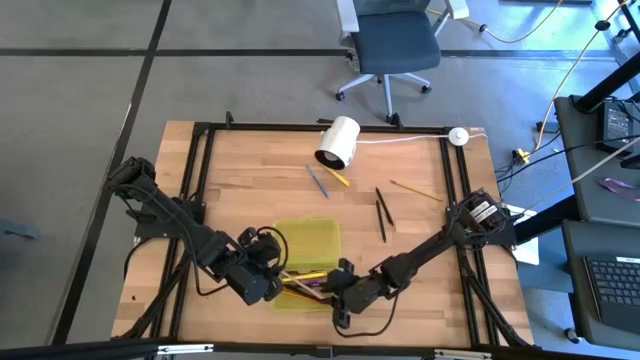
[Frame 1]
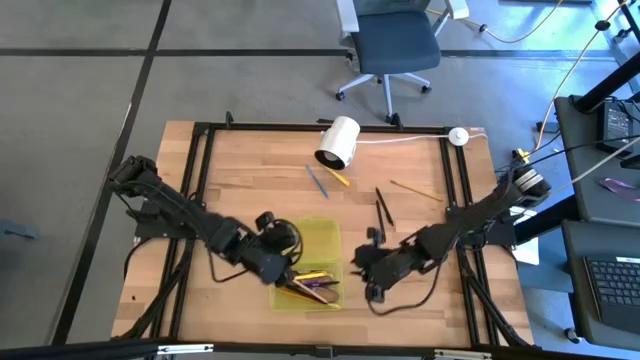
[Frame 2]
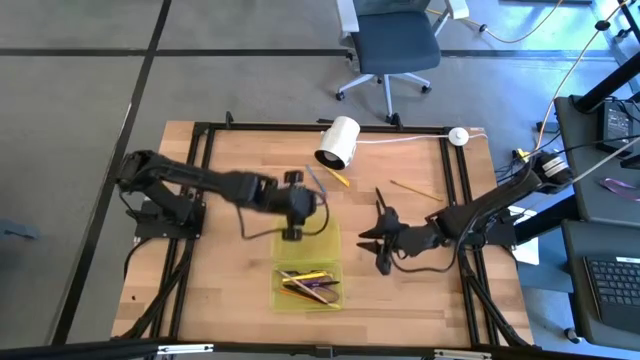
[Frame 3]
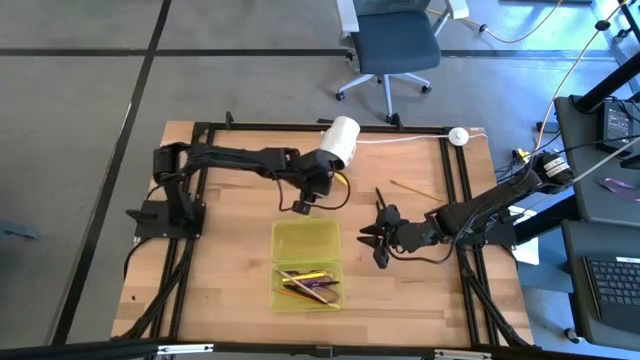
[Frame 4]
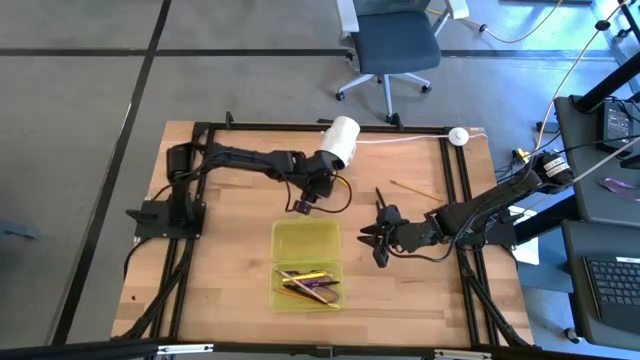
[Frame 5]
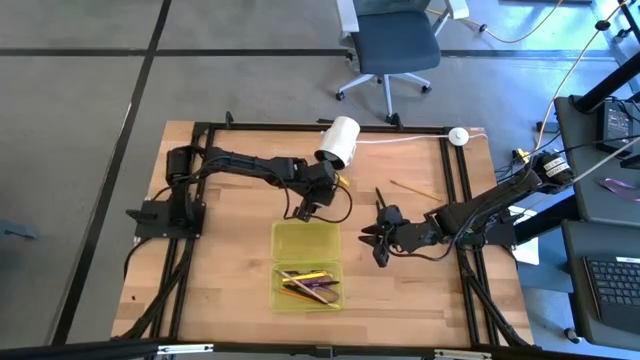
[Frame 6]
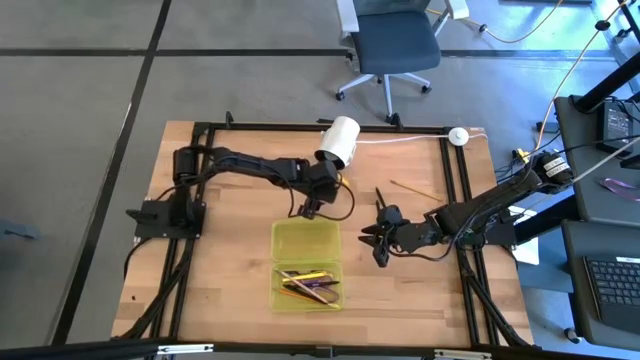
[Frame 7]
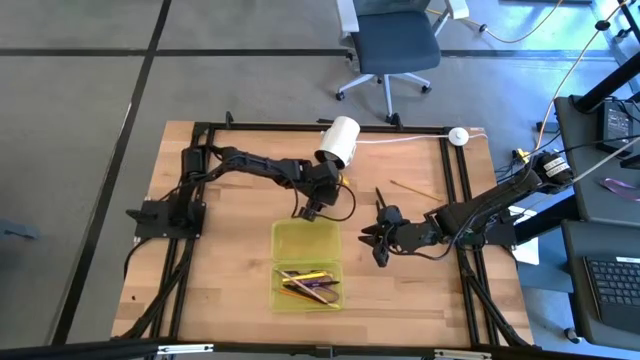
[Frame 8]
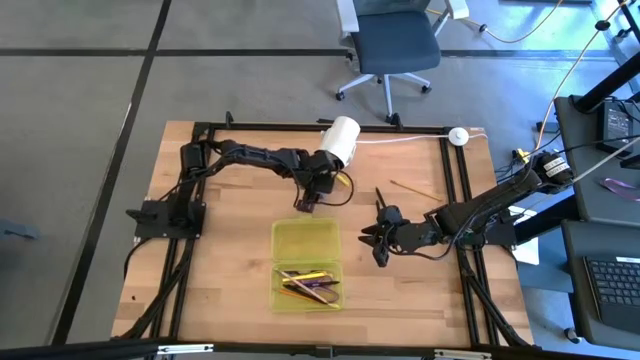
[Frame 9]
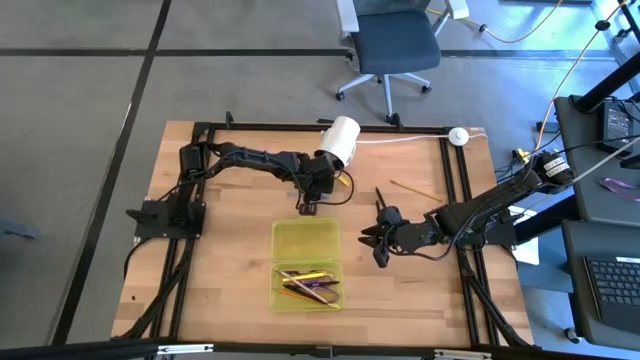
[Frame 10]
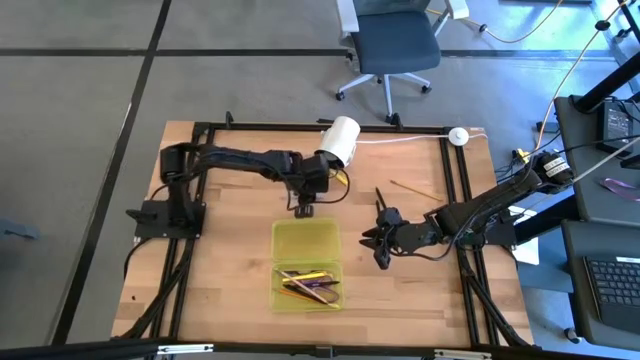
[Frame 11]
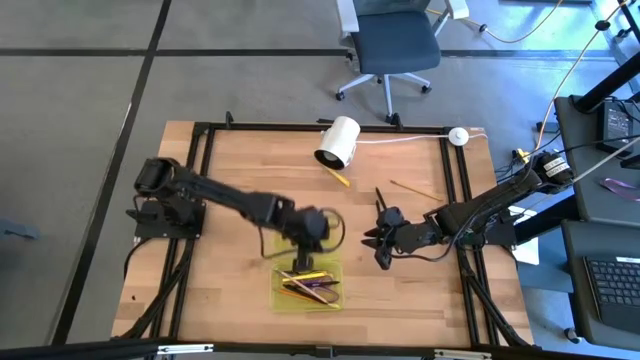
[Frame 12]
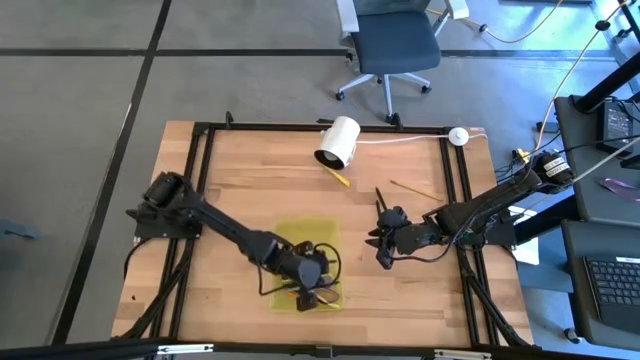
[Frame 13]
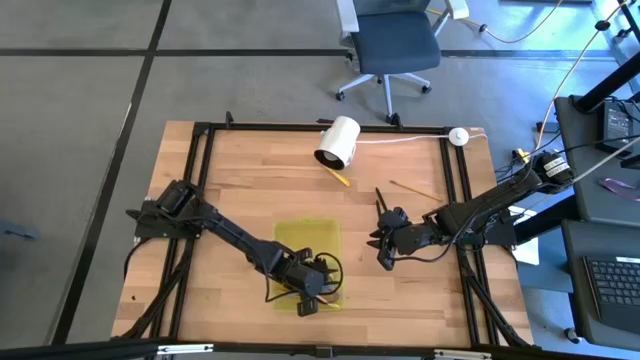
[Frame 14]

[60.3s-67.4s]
Task: Pick & place school supplies into a supply box
Put the blue pen into the yellow supply box

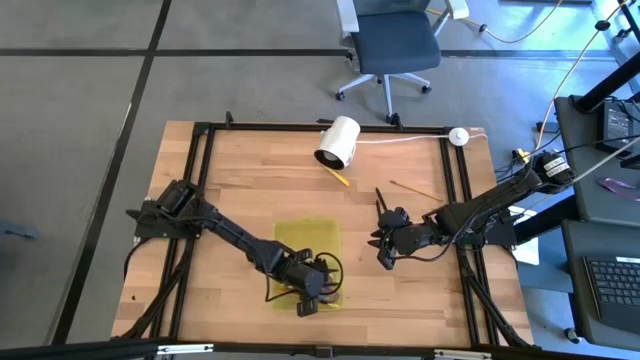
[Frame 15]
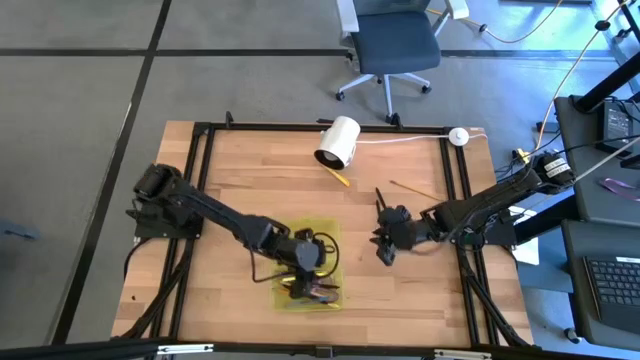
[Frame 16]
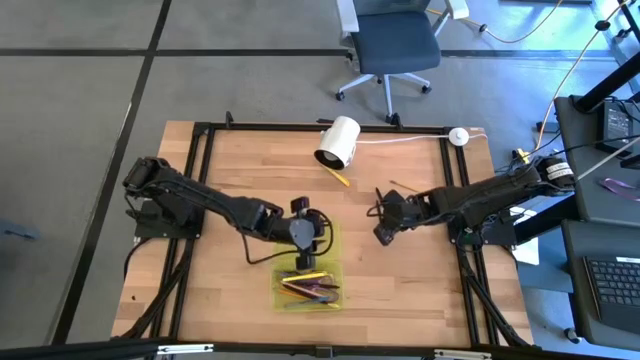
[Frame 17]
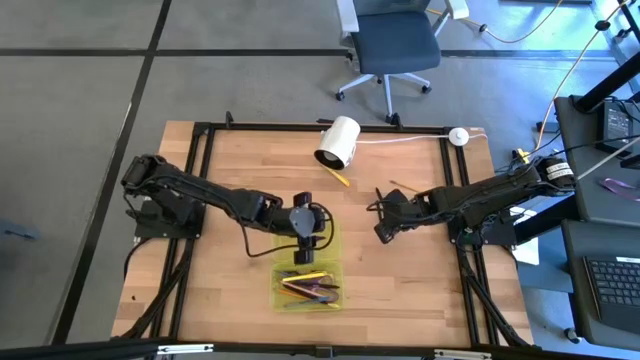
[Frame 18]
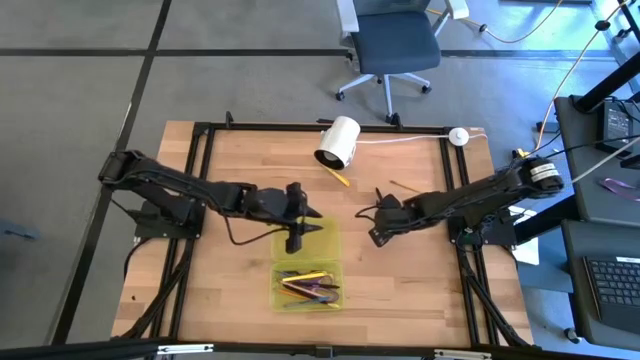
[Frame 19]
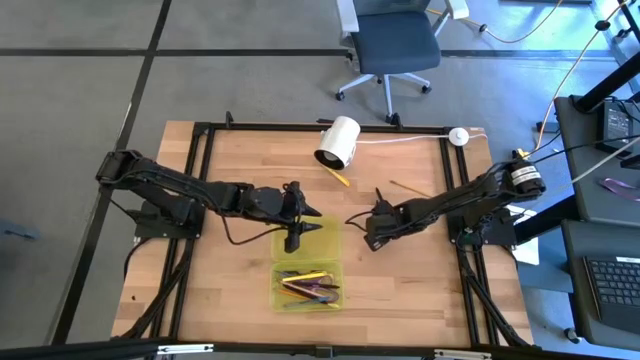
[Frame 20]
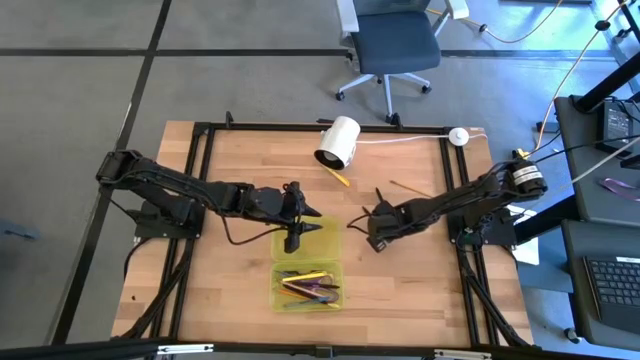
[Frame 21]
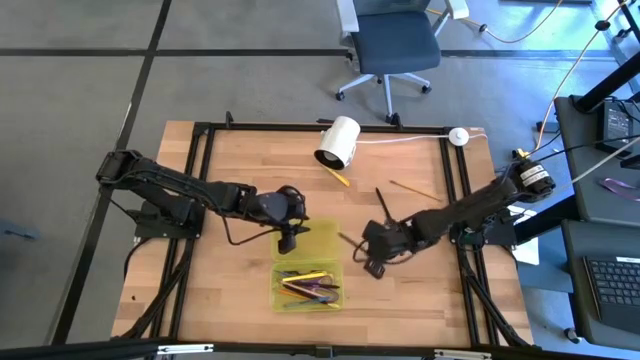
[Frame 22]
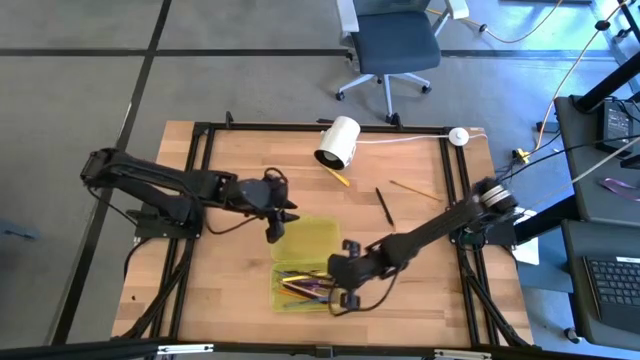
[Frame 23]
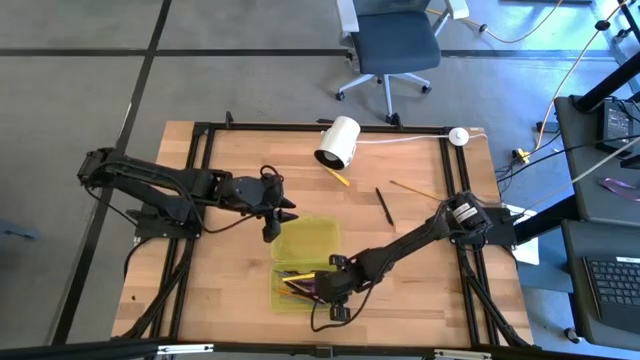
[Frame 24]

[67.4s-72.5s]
Put the black pen into the yellow supply box

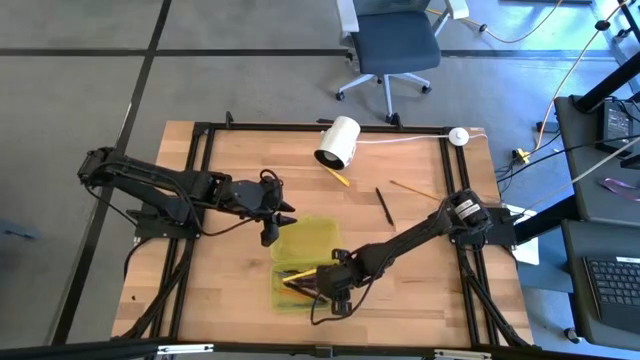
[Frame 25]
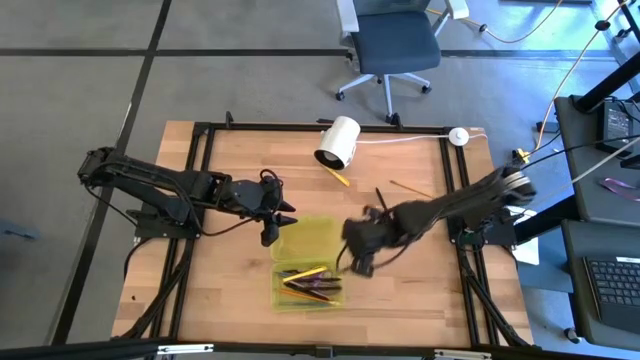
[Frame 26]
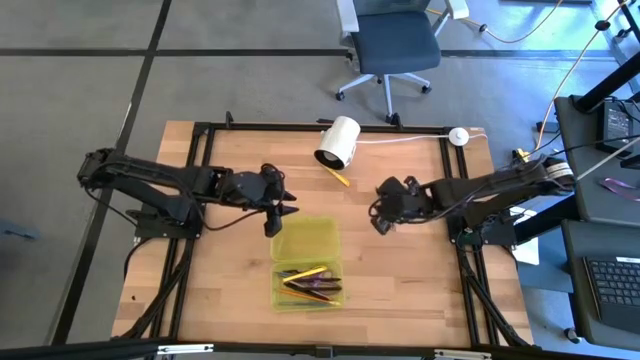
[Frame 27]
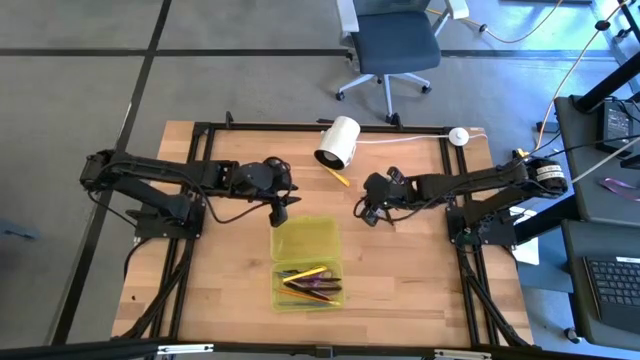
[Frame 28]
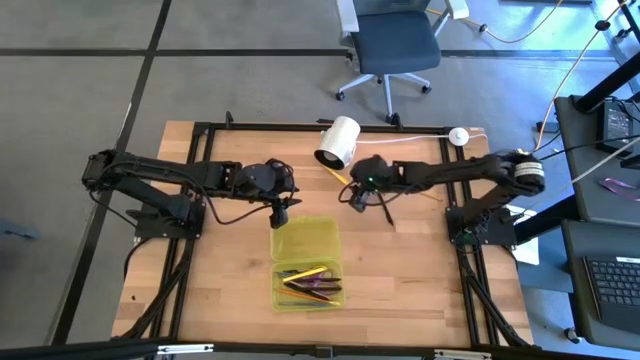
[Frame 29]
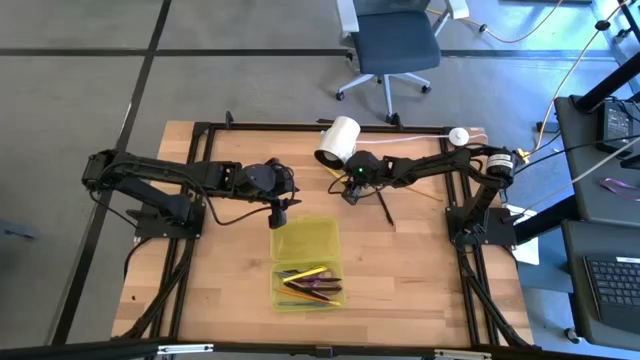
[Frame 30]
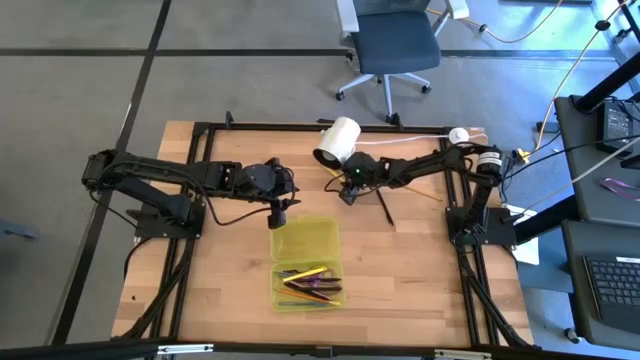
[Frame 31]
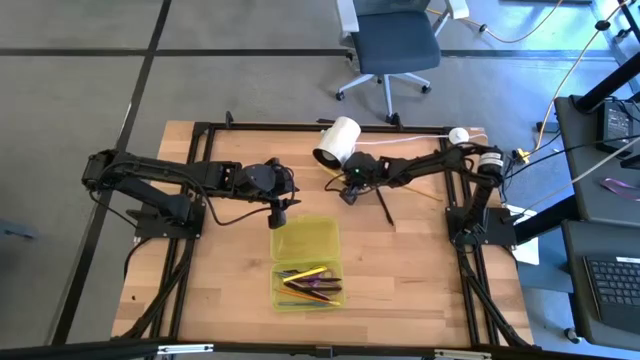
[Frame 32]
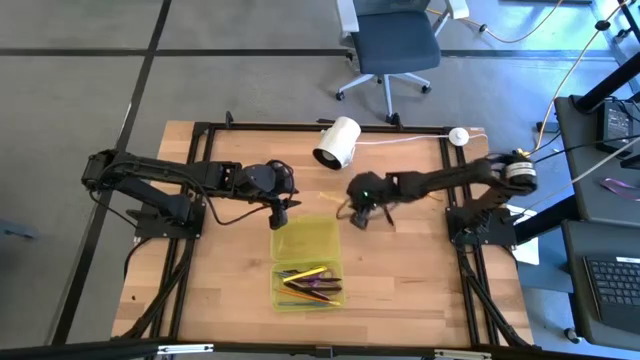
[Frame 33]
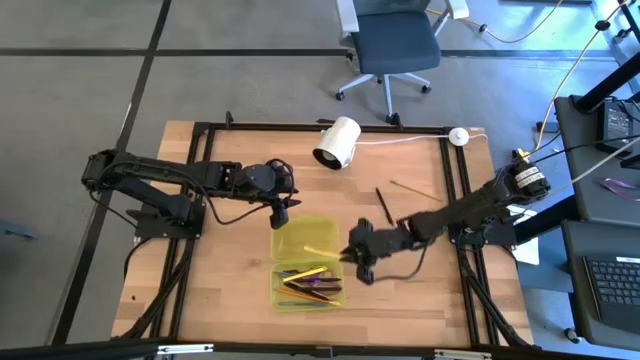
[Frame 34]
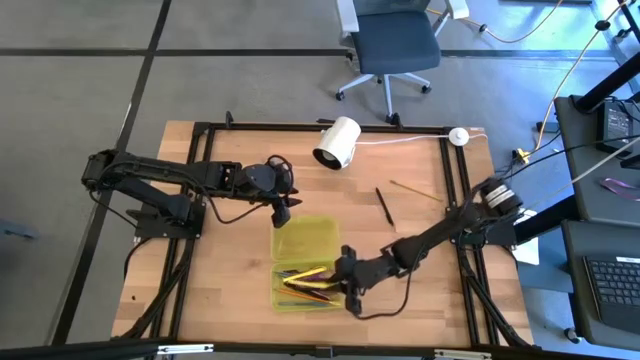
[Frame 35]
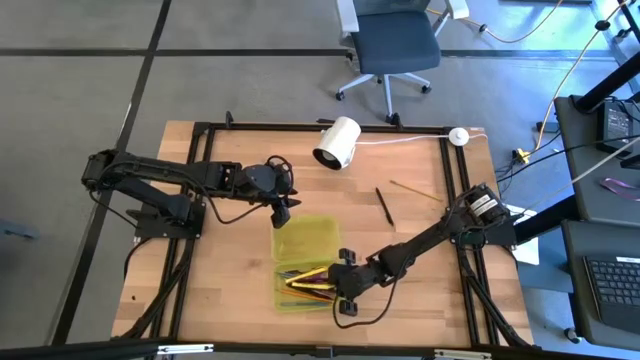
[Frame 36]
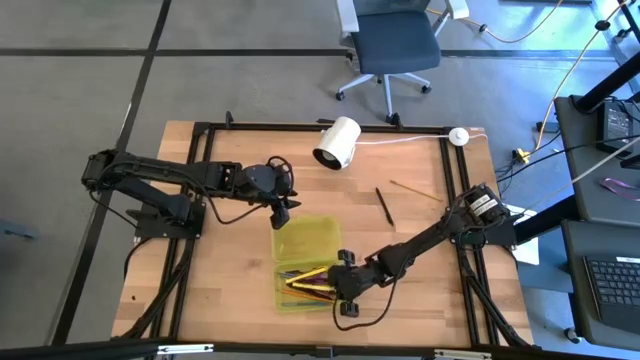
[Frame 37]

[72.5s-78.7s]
Put the yellow pen into the yellow supply box

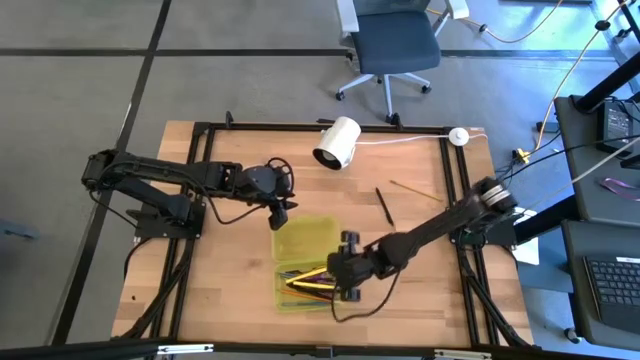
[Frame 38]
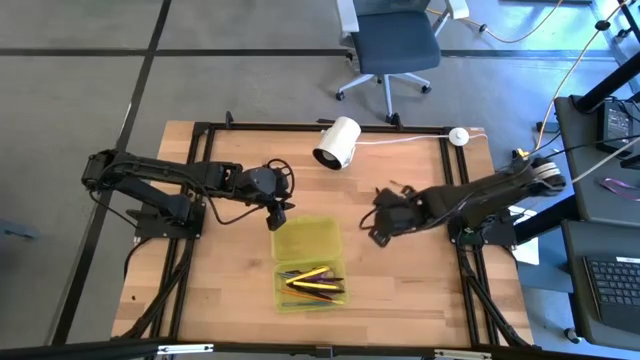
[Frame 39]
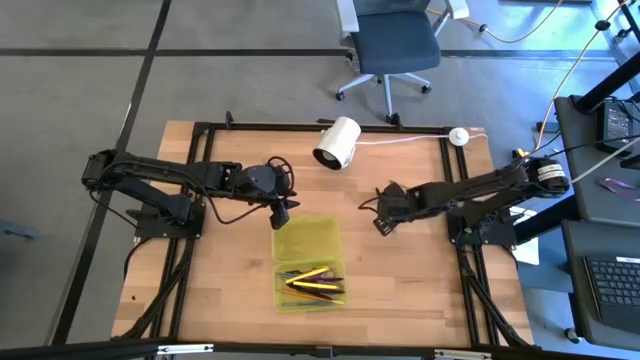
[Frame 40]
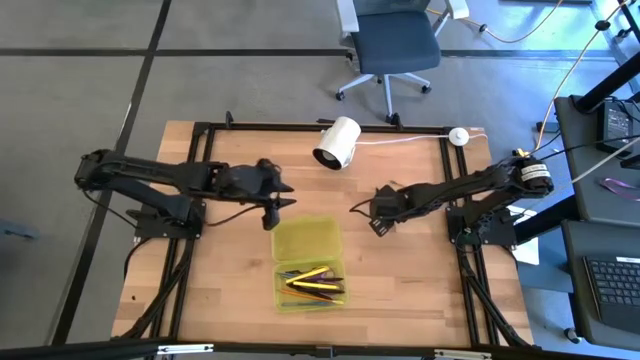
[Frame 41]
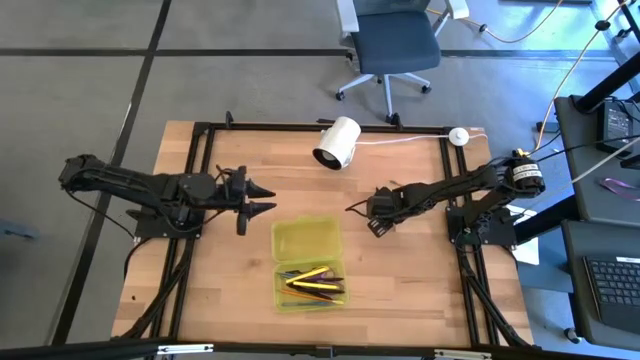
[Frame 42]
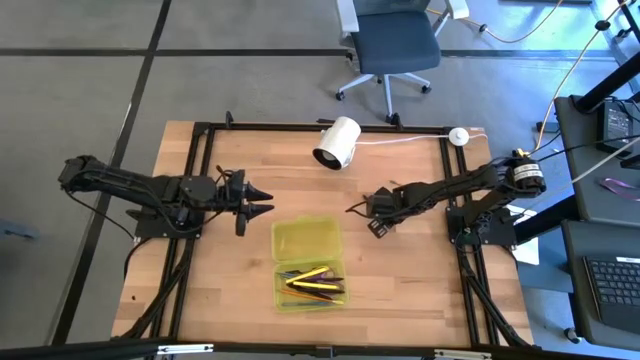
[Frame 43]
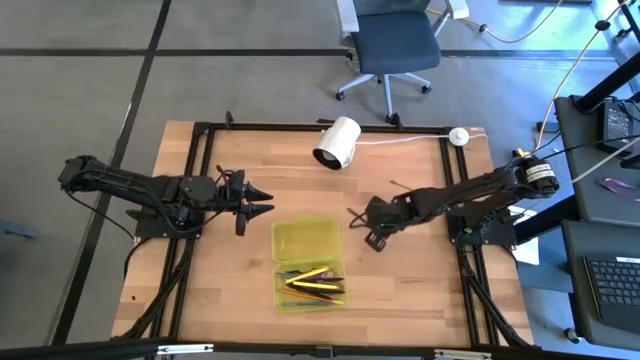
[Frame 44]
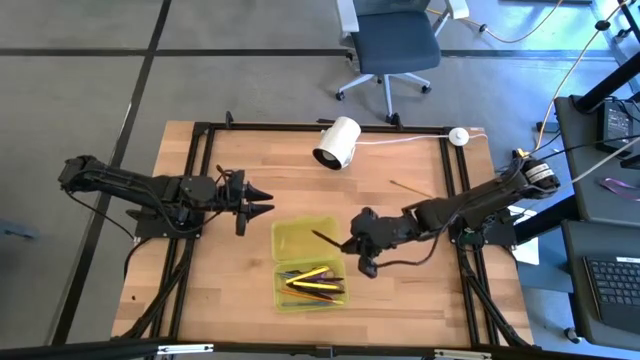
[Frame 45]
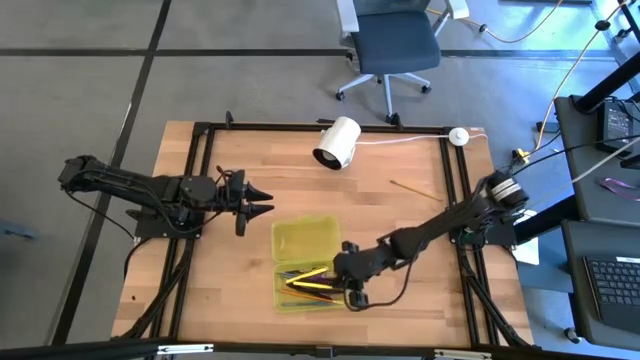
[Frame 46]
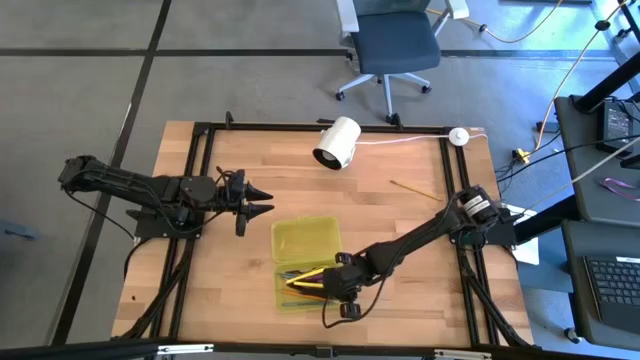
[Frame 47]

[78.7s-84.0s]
Put the black pen into the yellow supply box
